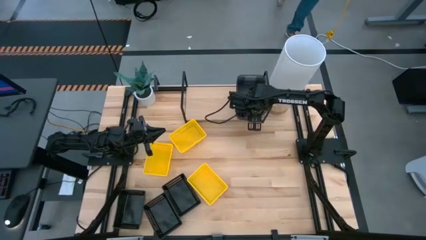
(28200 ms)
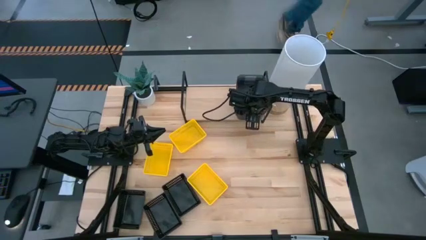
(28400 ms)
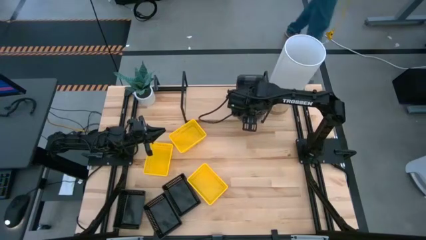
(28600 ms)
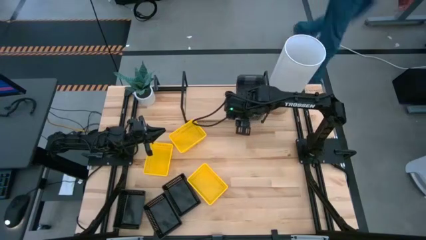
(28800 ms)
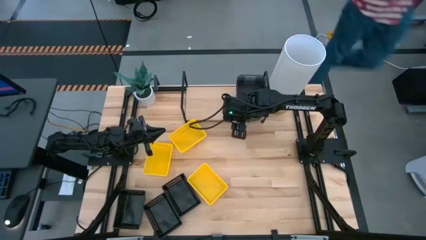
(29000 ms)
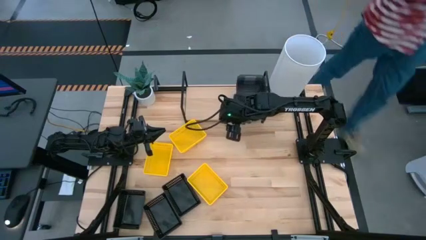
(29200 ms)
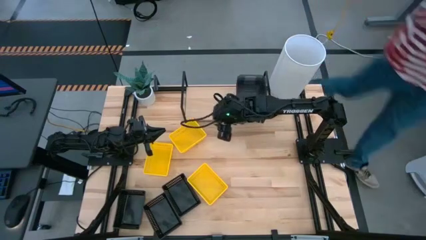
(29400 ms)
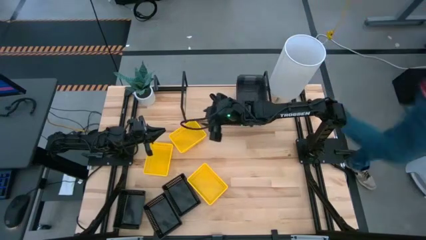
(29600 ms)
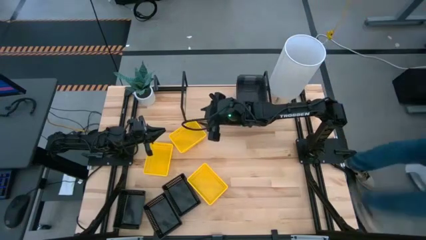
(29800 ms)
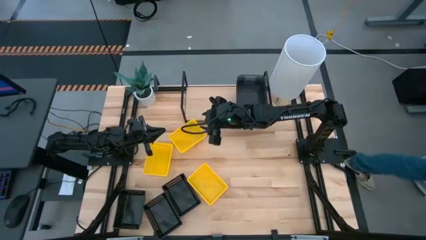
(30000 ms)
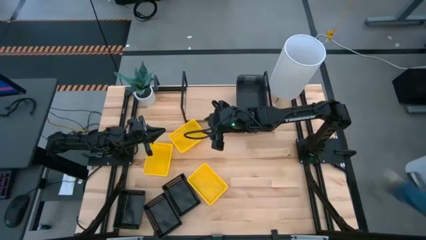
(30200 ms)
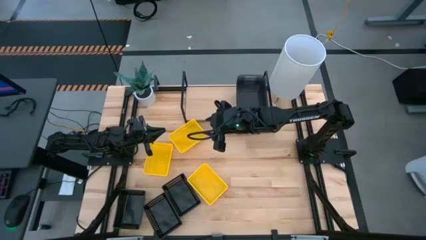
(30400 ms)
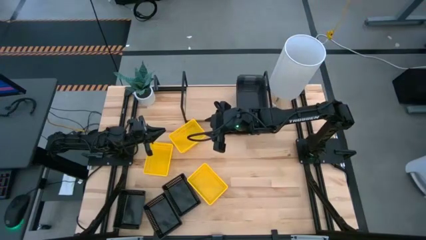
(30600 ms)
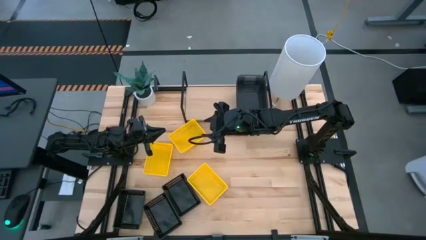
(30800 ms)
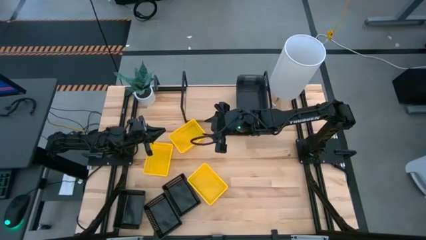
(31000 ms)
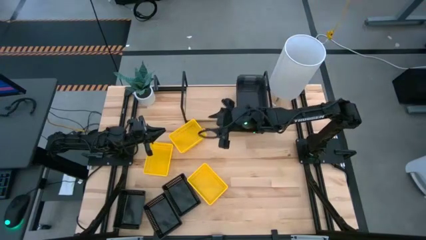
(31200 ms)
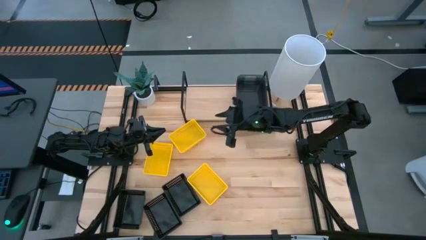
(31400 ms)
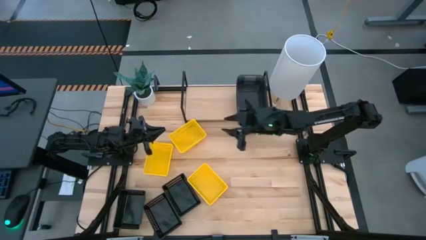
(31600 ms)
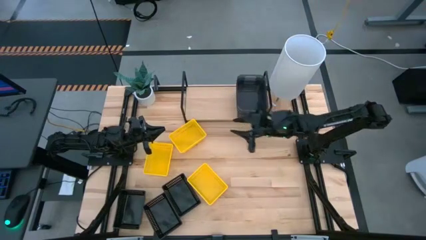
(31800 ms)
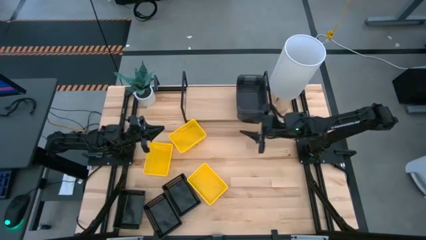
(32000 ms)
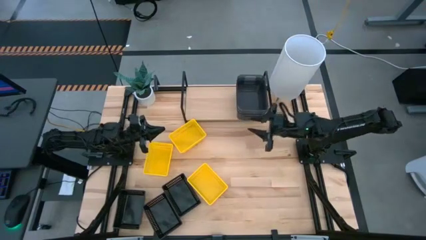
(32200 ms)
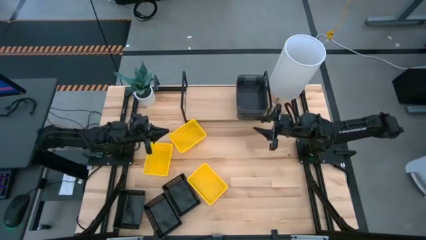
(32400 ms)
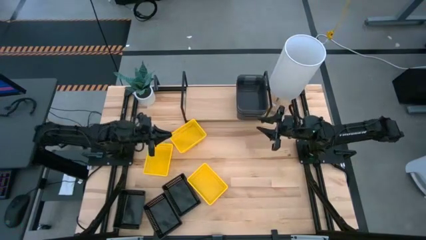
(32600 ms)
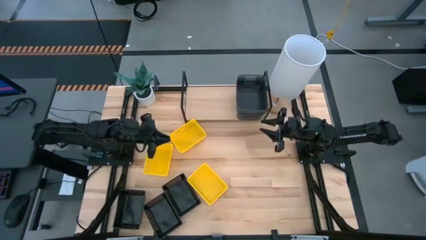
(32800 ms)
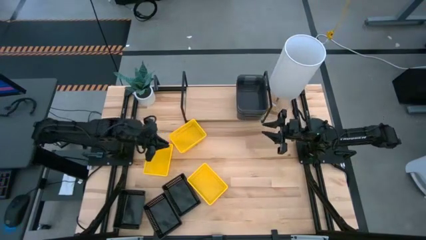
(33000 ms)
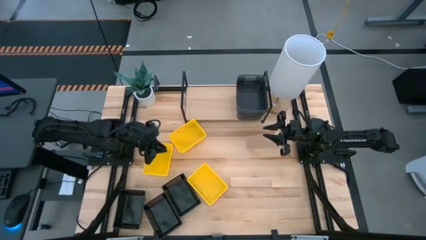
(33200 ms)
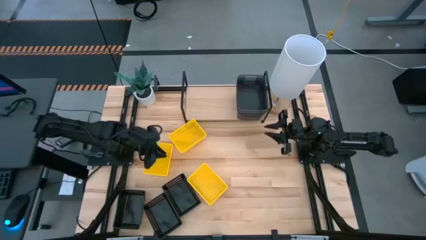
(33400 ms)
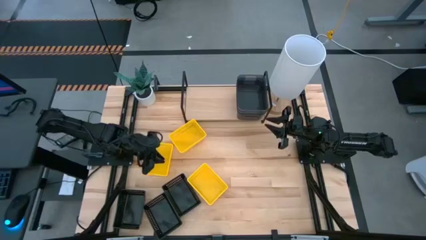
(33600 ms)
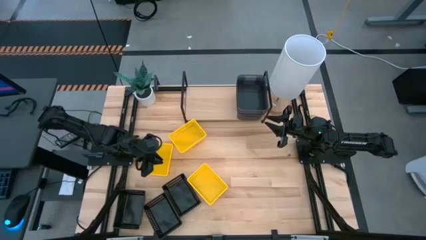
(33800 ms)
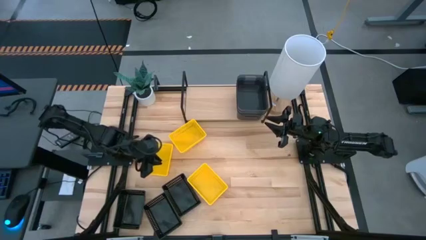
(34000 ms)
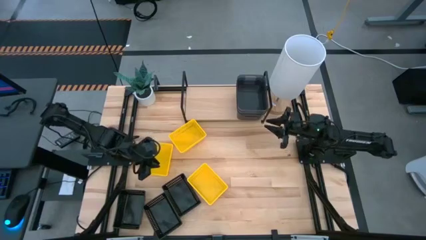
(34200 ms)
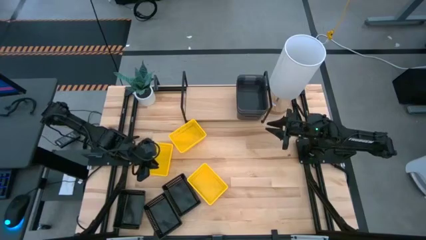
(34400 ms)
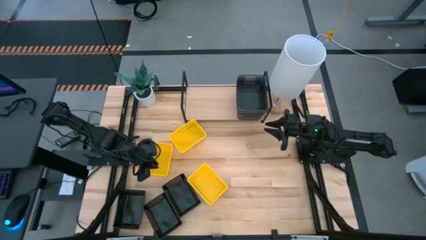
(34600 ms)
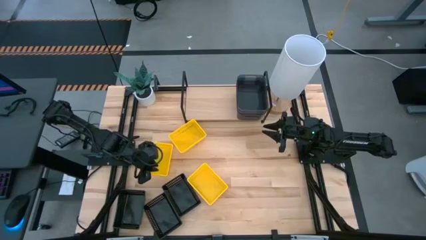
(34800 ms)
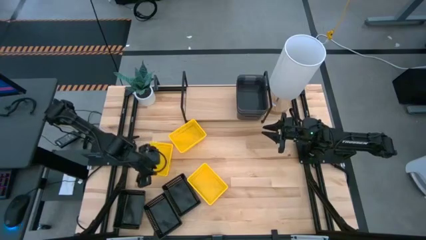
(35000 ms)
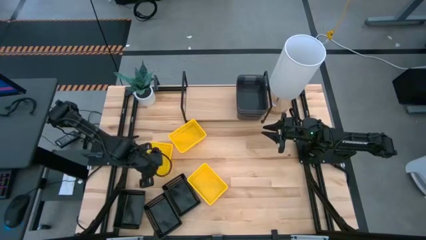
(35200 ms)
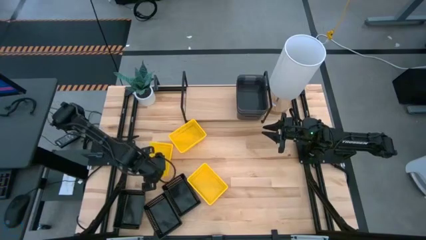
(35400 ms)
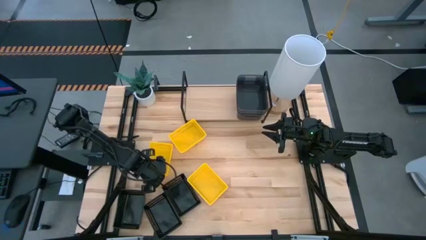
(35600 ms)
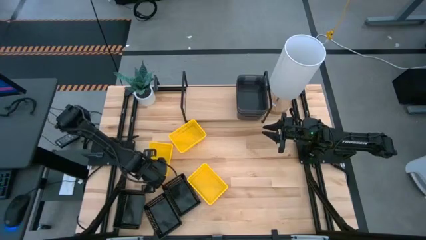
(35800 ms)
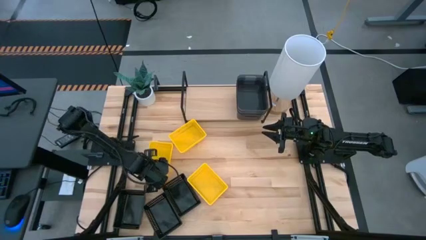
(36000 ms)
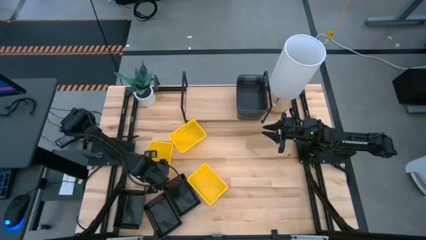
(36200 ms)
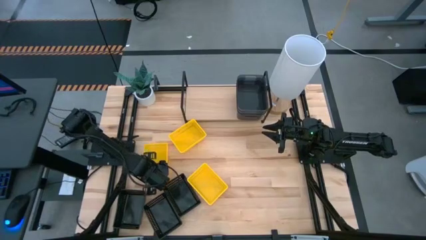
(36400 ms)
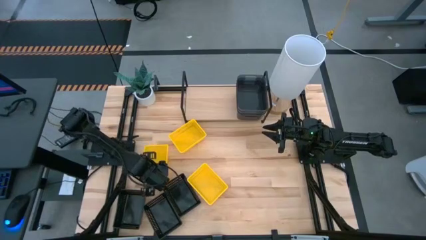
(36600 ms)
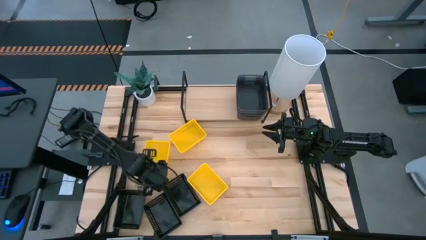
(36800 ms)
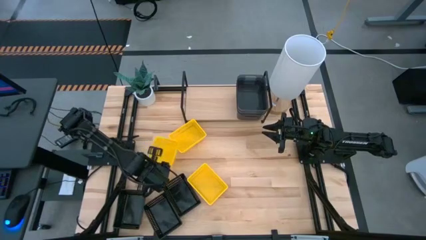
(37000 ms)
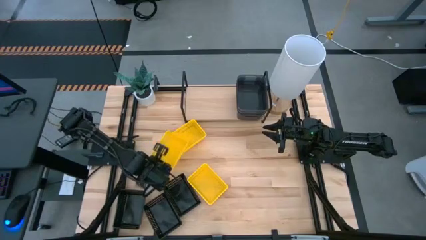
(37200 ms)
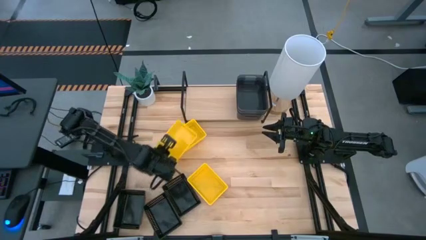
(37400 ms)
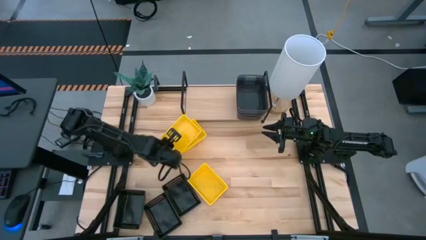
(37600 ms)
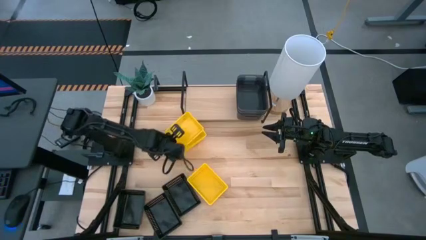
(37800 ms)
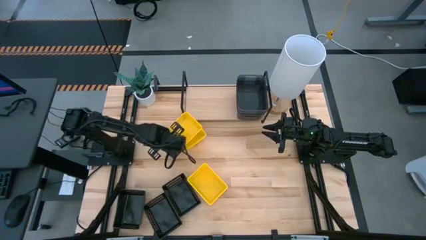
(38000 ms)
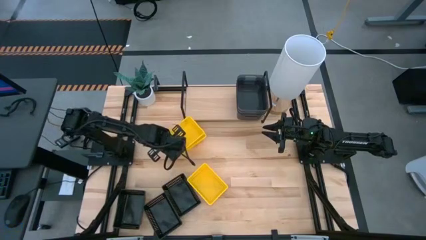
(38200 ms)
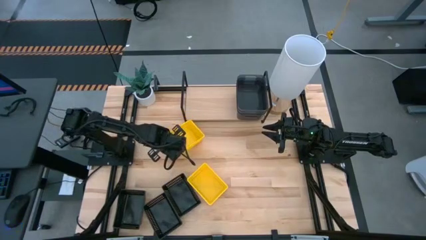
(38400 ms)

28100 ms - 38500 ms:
Task: Stack baskets on shelf by color
Stack the middle yellow bin on the top yellow bin

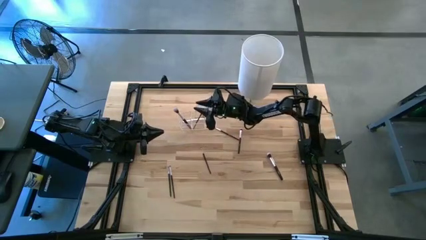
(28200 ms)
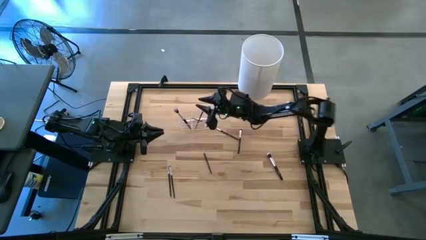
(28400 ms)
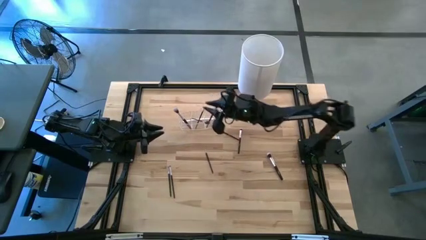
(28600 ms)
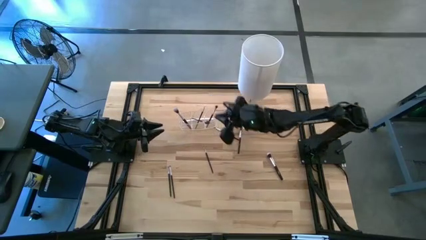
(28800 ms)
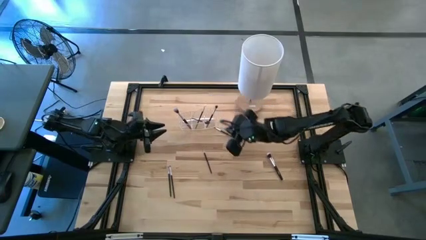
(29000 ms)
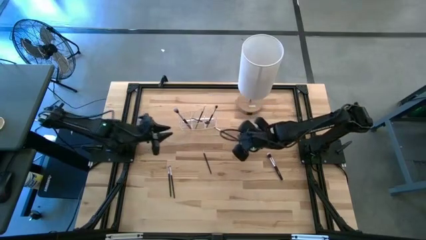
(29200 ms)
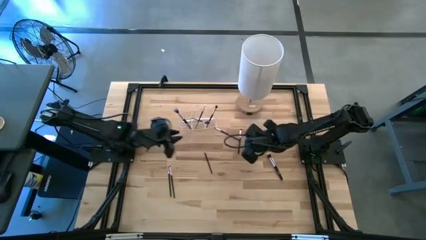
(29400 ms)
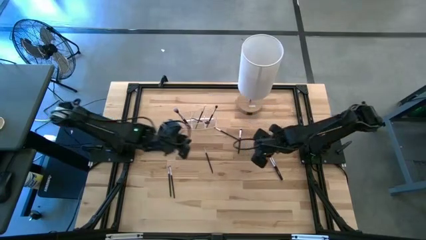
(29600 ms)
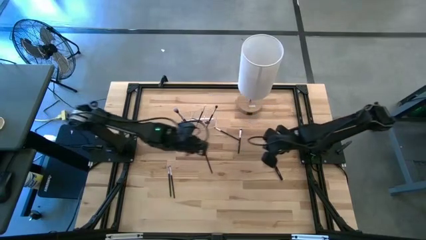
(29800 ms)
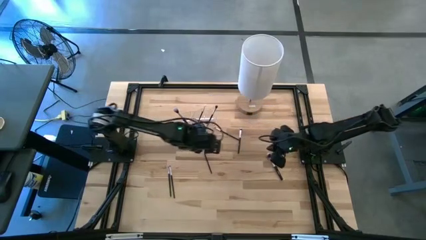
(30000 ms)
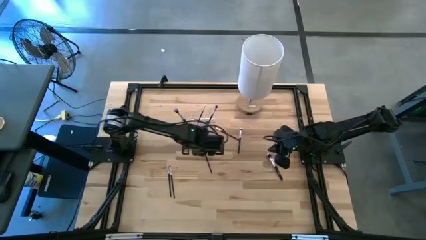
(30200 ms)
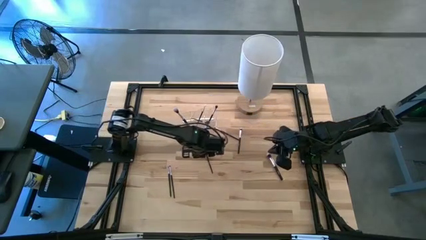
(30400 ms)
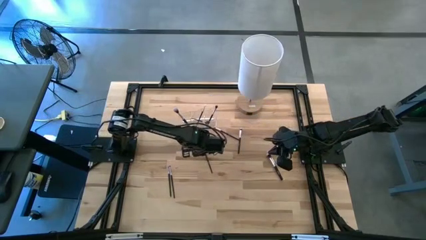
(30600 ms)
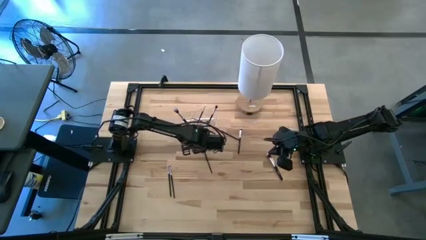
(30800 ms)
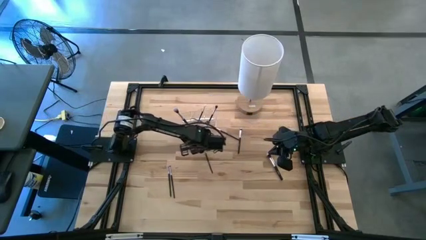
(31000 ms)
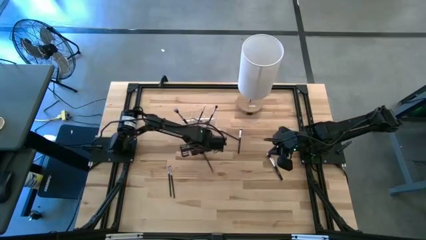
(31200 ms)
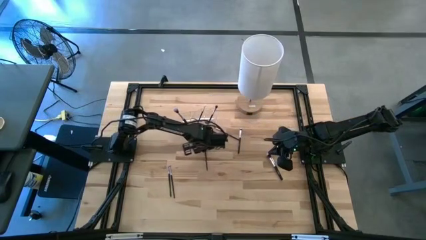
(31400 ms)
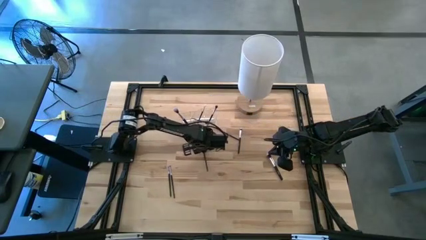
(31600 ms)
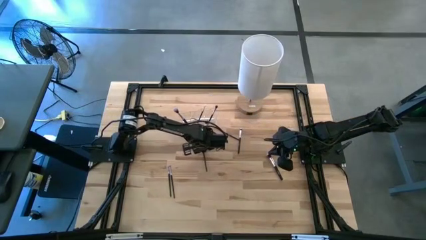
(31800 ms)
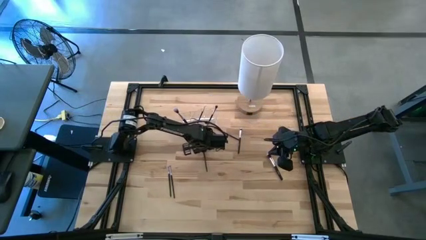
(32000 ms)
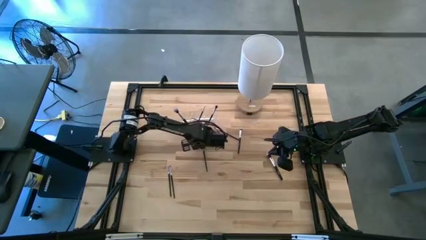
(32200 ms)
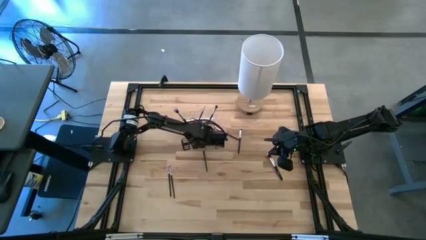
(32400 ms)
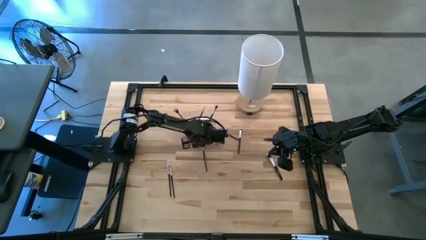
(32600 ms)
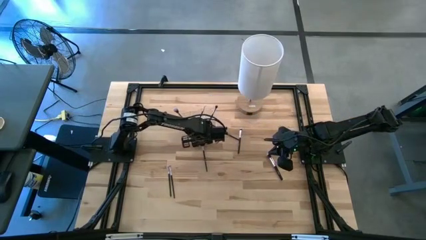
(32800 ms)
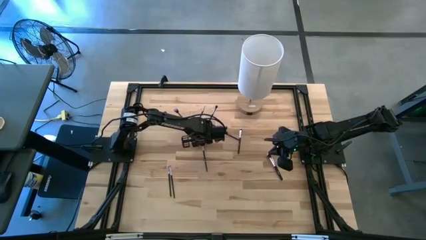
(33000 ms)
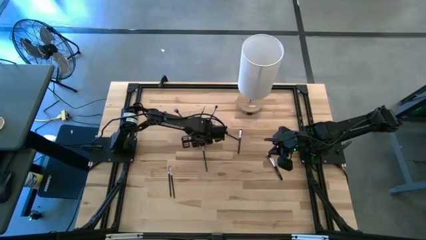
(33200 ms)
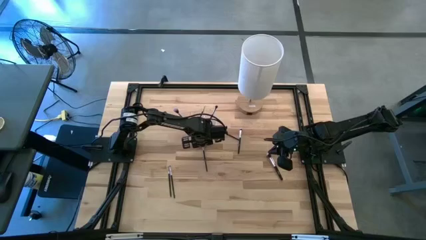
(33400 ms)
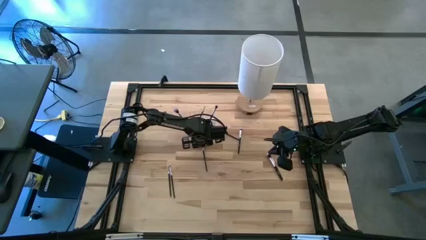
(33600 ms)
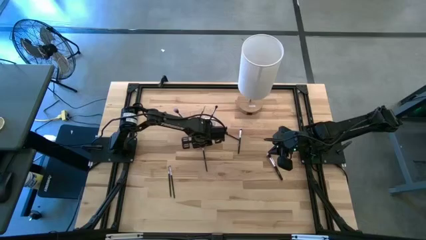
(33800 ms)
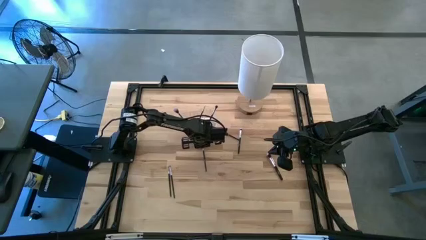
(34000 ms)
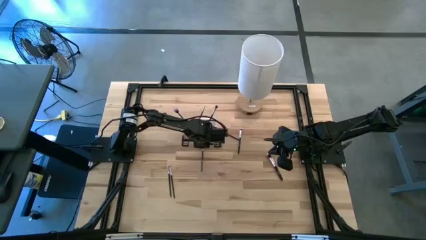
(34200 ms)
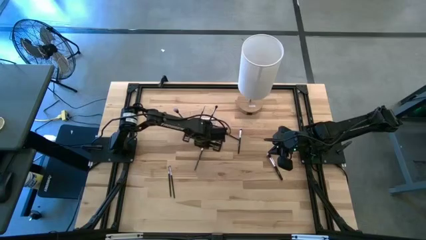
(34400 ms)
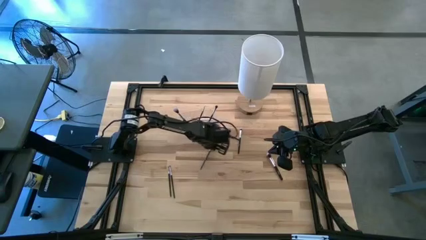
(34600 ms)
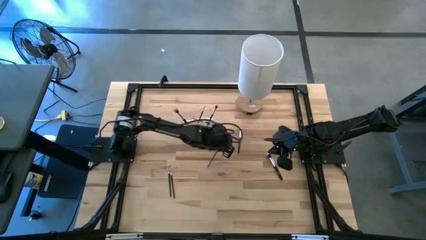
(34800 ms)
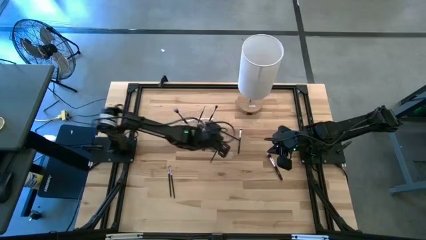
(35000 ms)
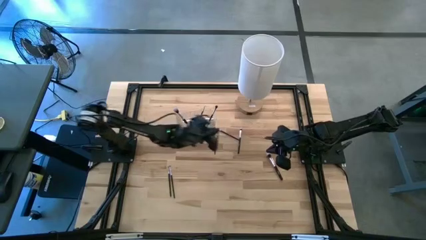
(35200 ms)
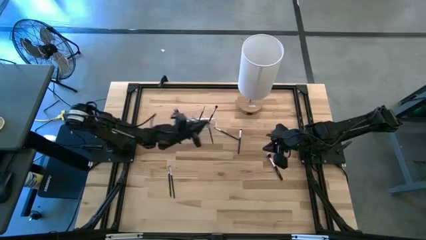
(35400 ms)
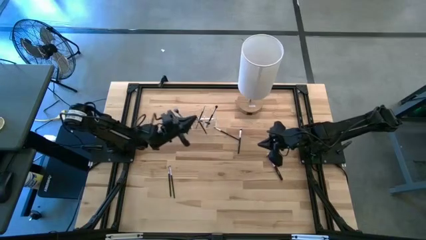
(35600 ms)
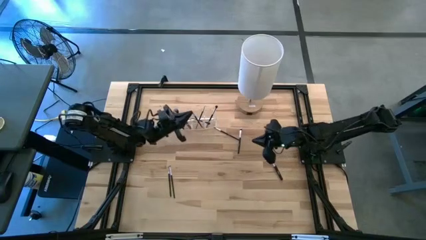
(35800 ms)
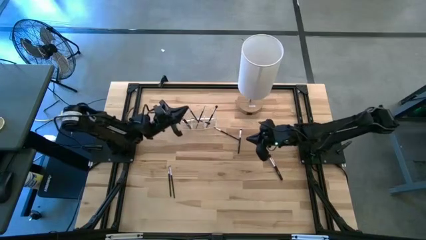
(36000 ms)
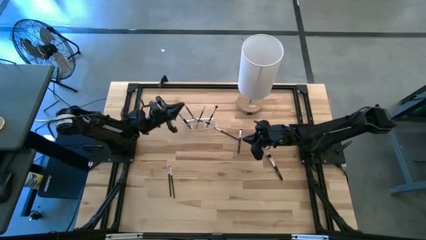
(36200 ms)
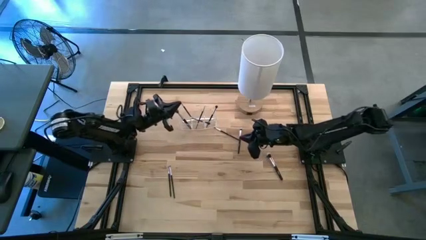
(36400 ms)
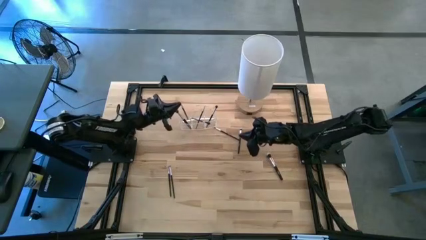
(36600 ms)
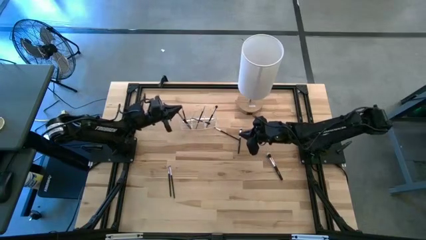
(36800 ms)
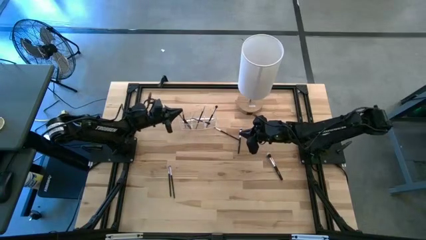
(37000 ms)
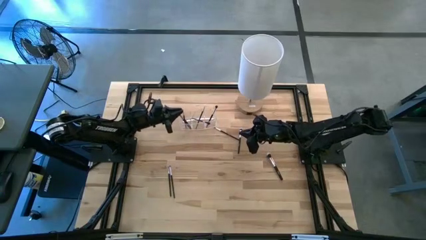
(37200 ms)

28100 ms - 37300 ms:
Task: Put items in baskets/containers
Put the black eyeshadow brush into the transparent organizer
